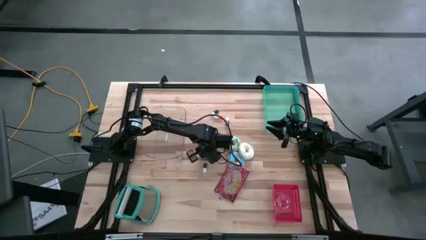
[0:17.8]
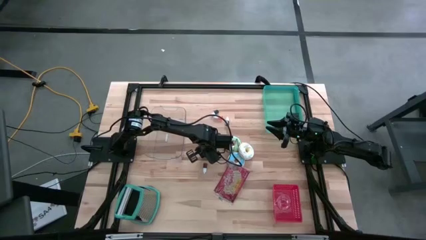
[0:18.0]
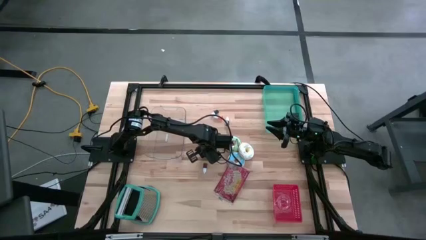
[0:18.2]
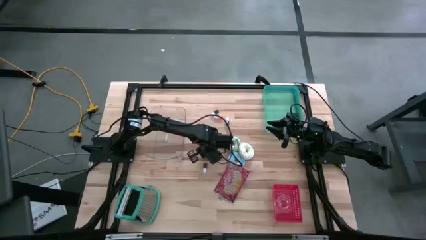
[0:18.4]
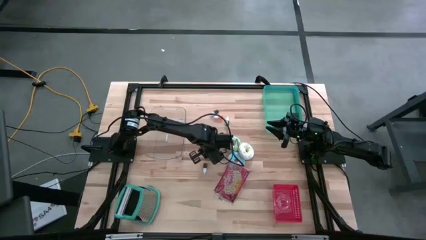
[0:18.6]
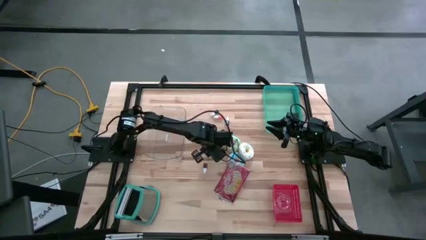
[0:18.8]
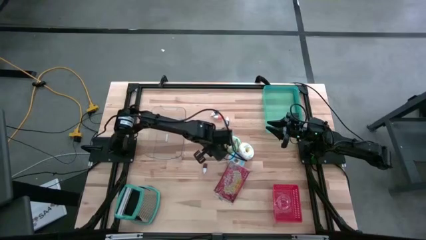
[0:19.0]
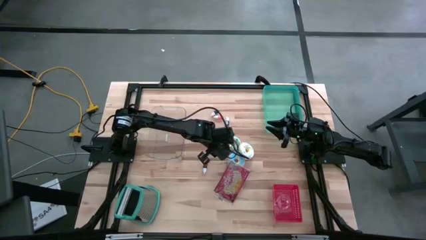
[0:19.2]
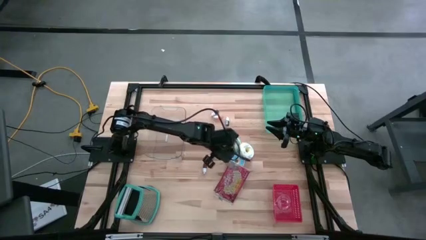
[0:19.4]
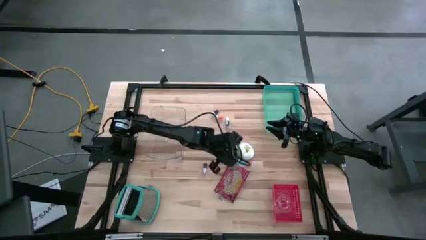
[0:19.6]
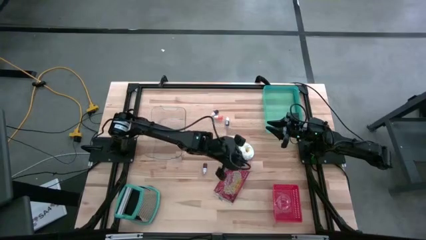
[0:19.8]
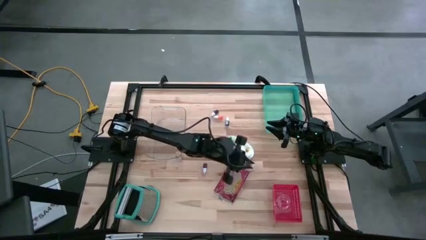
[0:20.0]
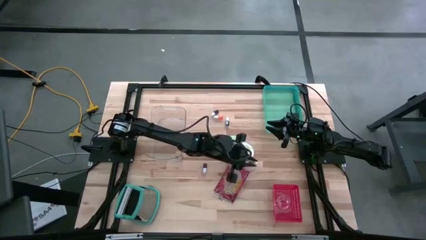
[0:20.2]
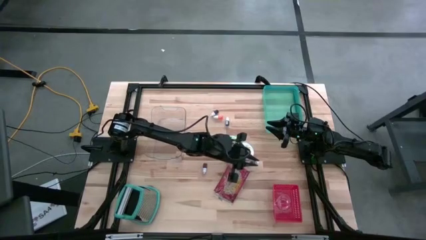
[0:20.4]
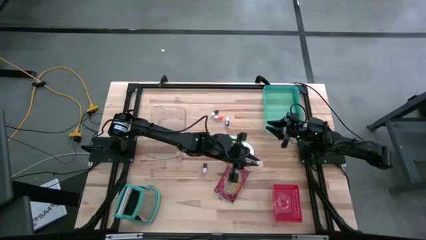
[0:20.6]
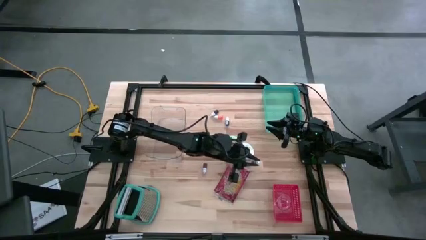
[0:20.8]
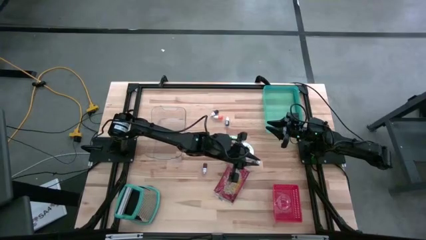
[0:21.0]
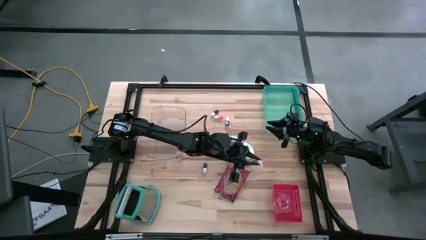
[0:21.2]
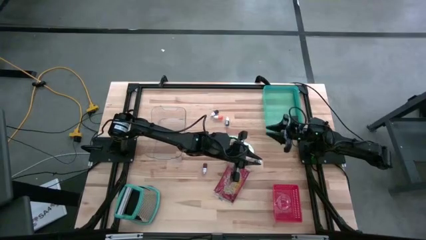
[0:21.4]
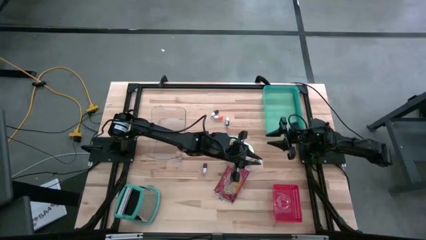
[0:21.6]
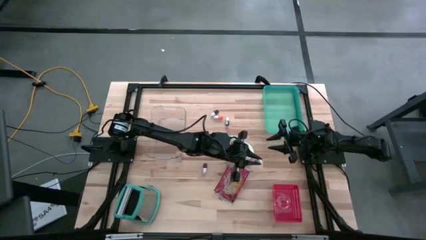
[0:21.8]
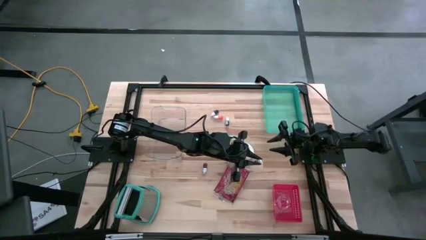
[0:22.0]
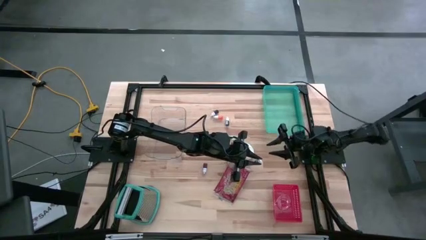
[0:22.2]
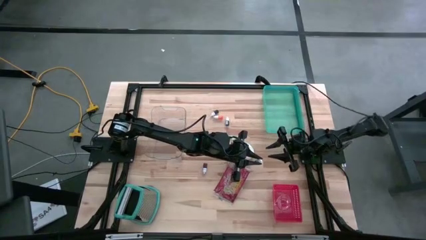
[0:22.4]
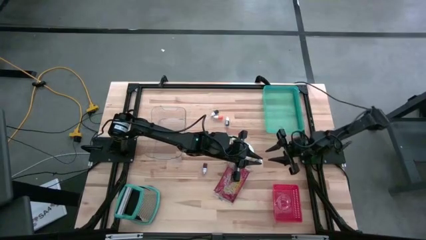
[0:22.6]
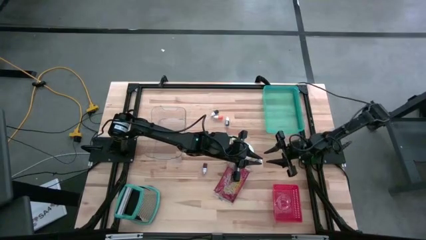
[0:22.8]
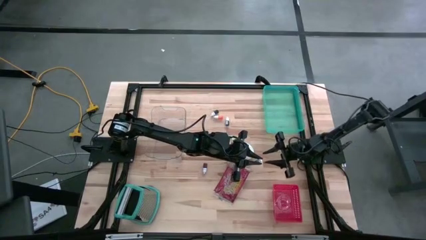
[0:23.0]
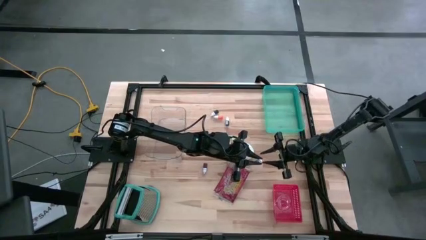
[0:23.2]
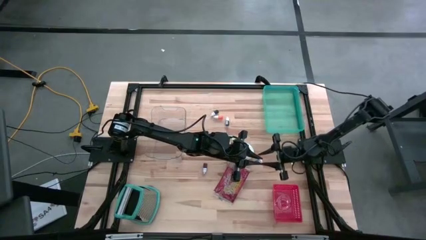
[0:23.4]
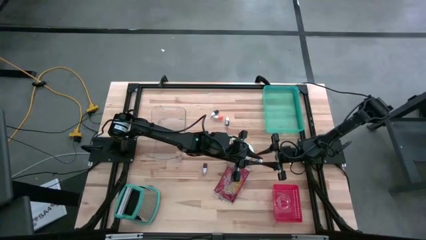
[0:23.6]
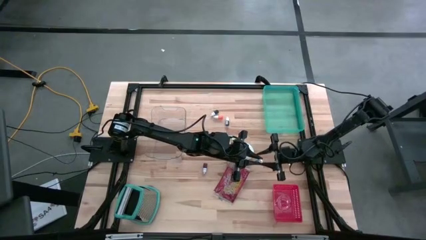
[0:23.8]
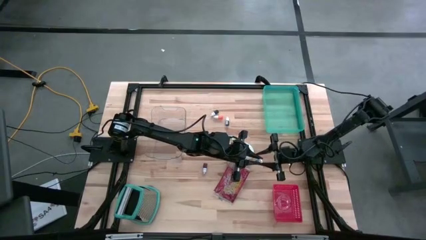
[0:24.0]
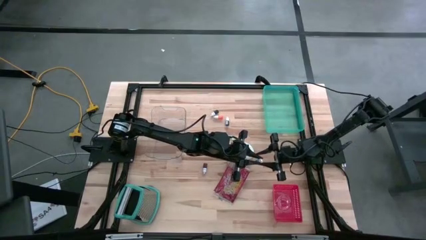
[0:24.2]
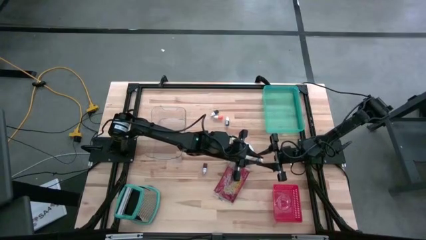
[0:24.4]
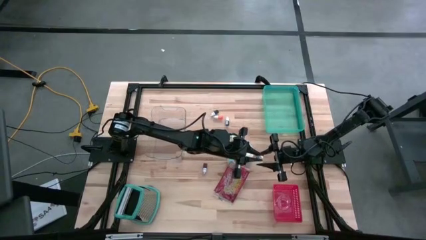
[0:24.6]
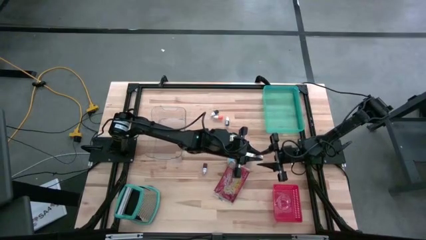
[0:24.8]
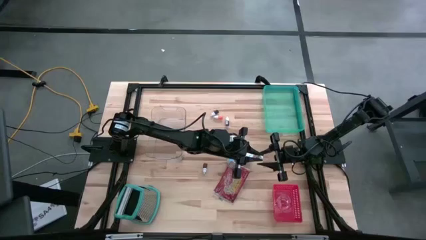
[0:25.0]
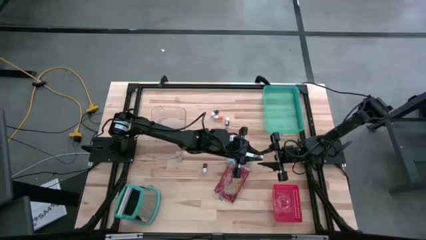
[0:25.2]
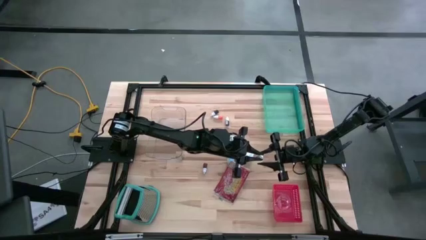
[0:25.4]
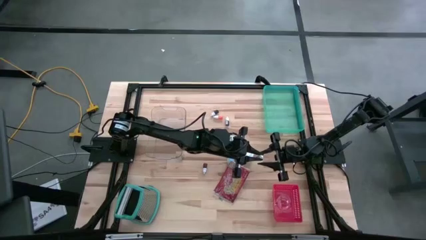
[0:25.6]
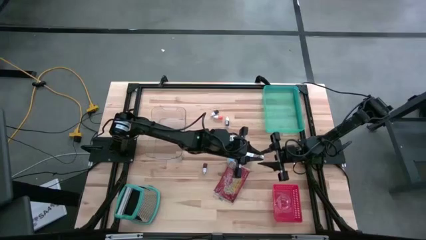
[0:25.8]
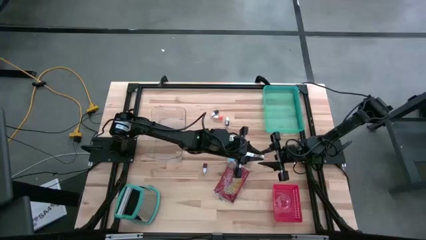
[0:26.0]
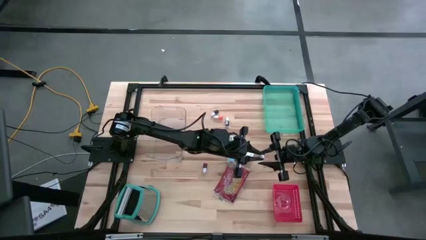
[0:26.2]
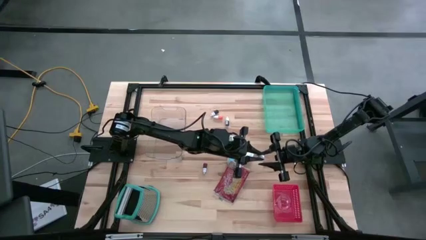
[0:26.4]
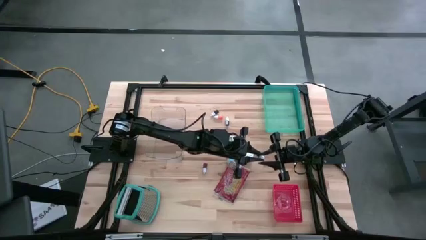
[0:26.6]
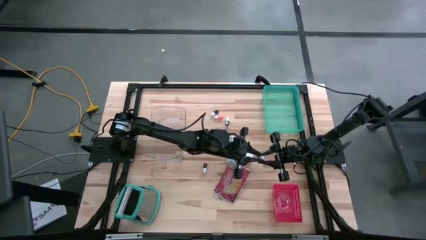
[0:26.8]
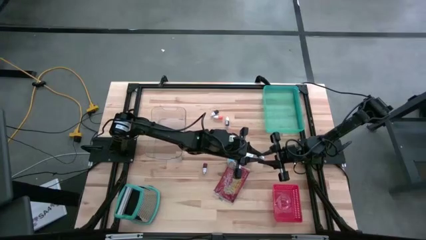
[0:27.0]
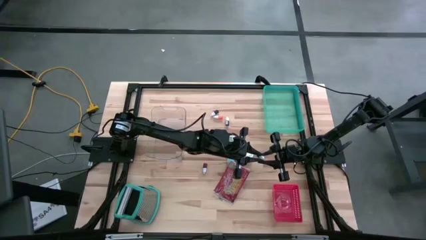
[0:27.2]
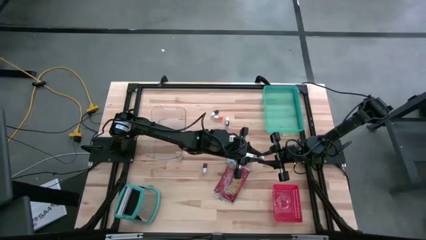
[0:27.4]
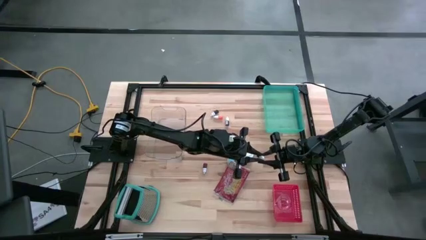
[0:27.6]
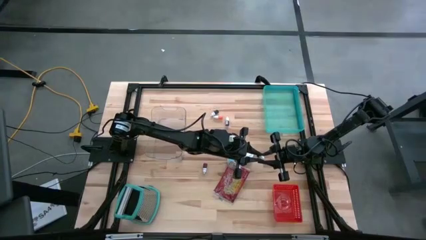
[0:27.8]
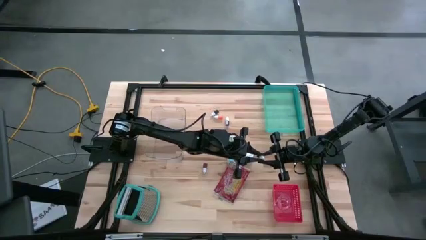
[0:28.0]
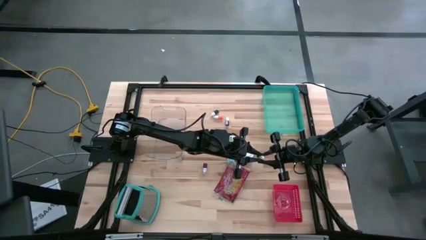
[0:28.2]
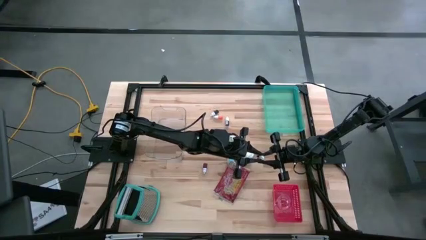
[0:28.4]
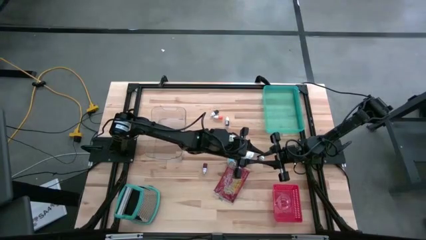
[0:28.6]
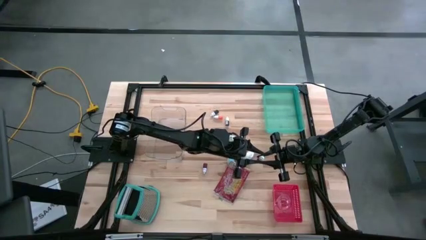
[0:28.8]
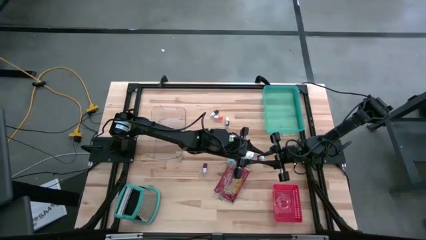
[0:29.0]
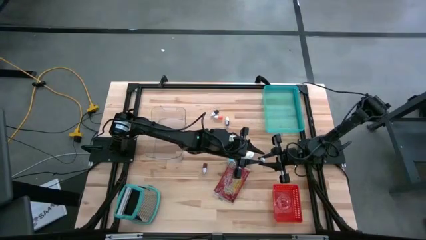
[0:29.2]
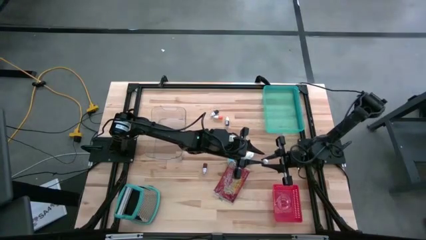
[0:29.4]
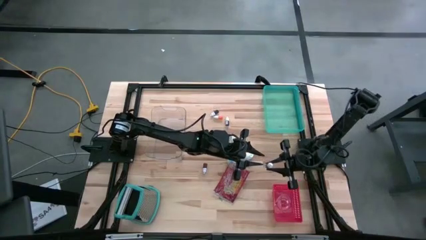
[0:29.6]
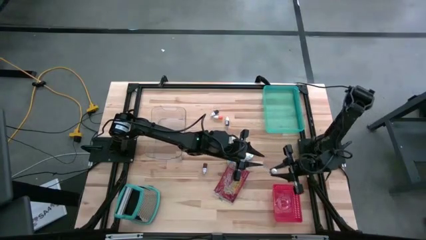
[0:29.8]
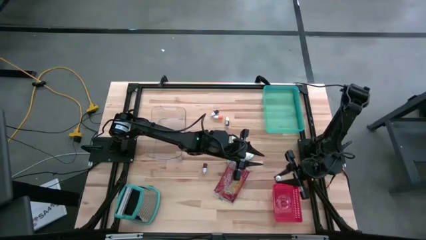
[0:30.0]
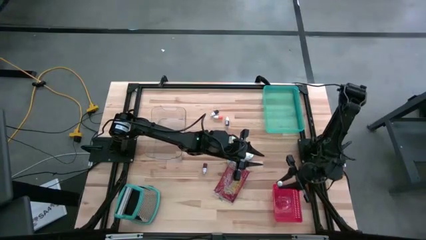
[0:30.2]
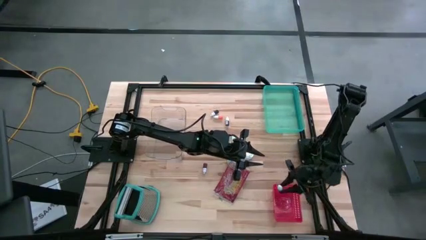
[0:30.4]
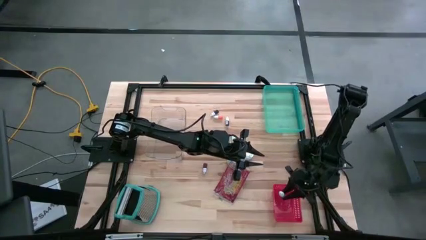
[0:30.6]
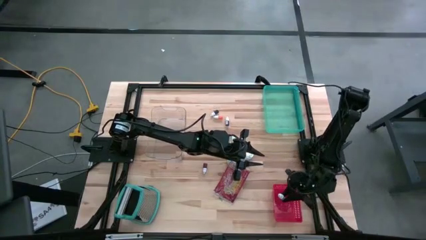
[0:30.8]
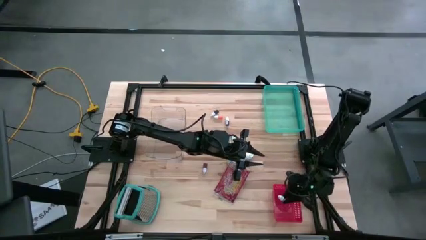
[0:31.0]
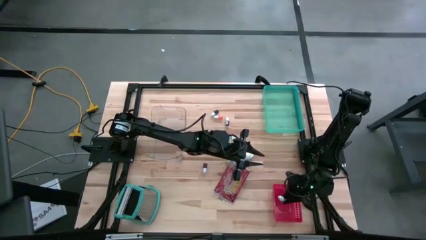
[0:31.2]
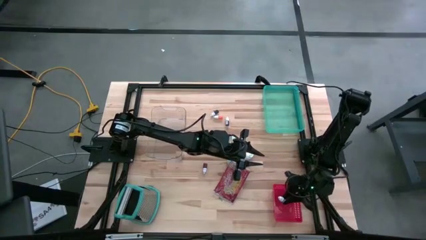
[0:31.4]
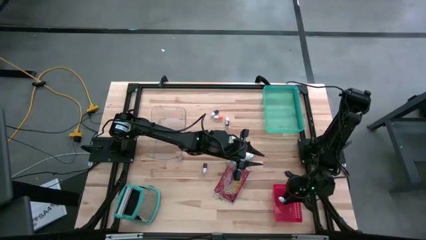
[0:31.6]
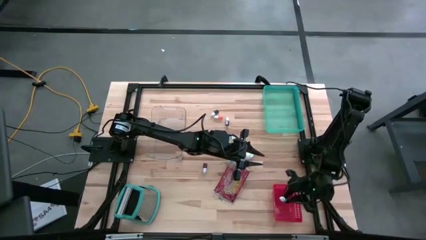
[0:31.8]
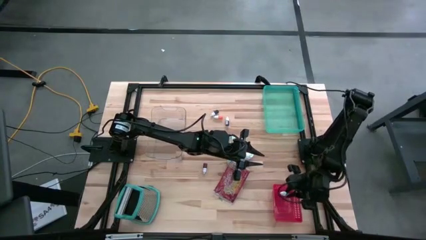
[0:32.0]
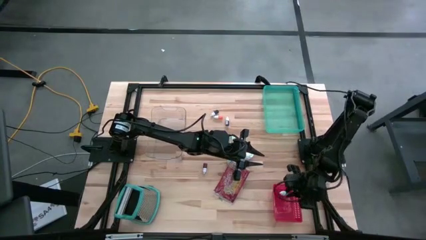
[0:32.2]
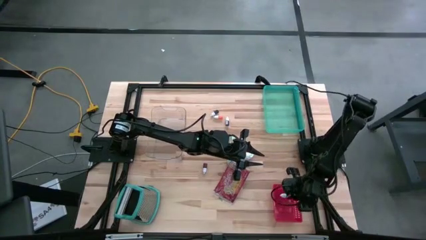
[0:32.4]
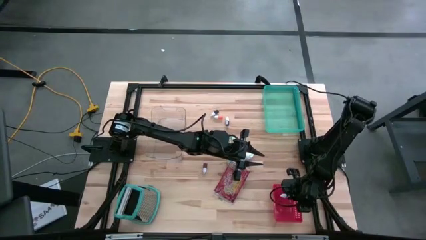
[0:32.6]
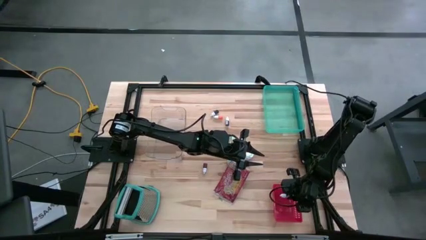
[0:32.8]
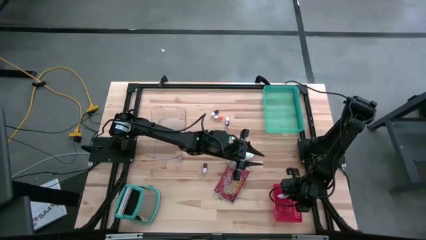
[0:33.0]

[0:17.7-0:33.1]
Put the black food coloring bottle into the red bin
